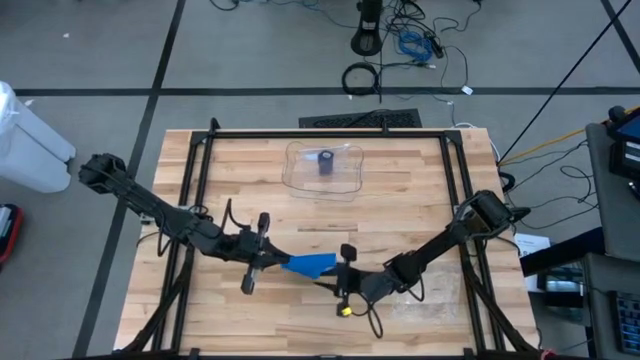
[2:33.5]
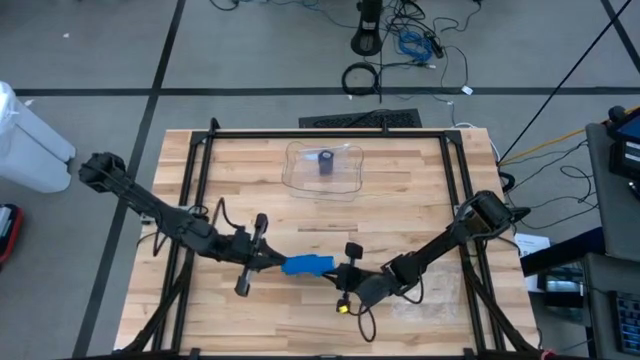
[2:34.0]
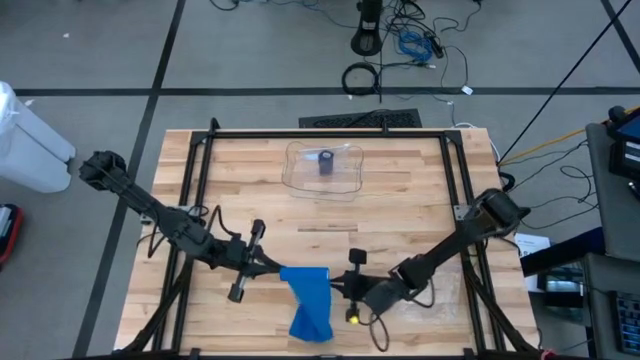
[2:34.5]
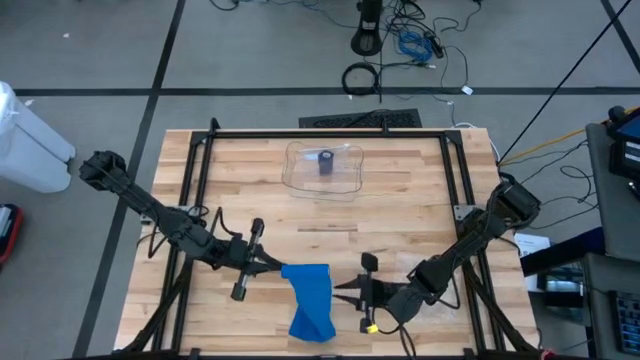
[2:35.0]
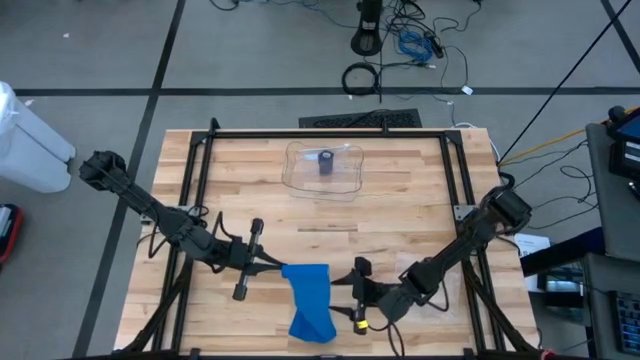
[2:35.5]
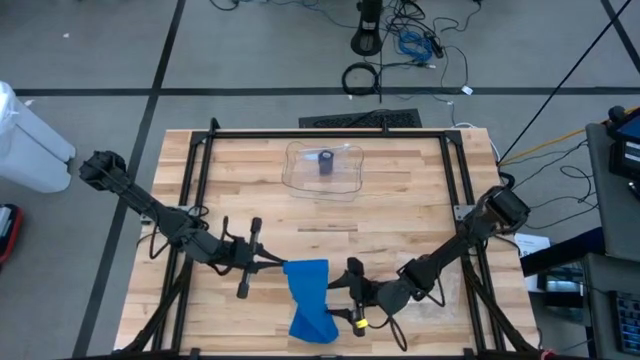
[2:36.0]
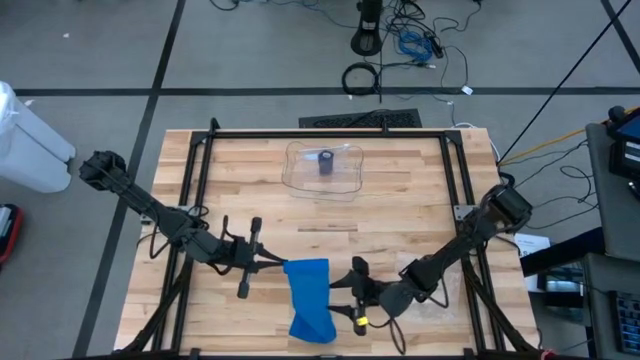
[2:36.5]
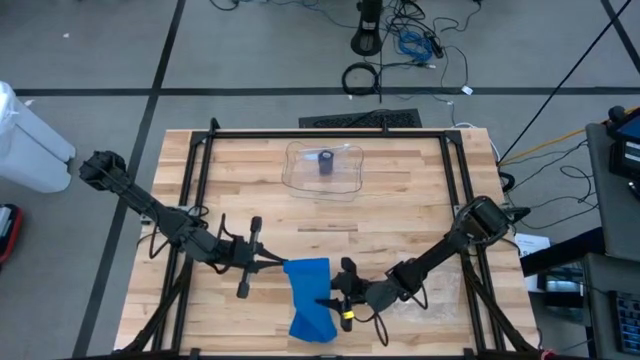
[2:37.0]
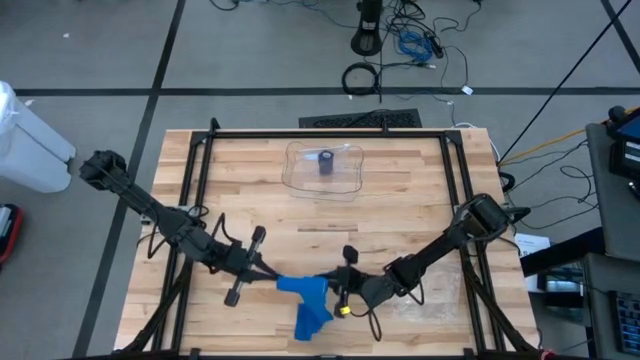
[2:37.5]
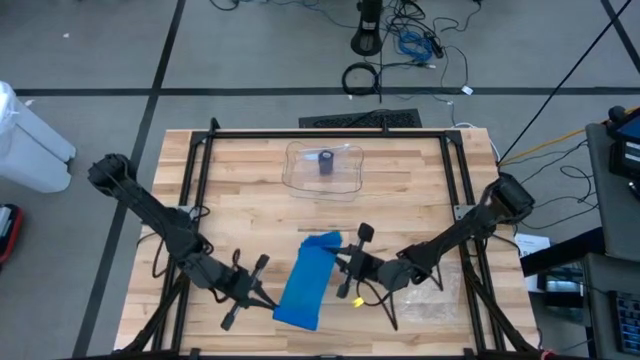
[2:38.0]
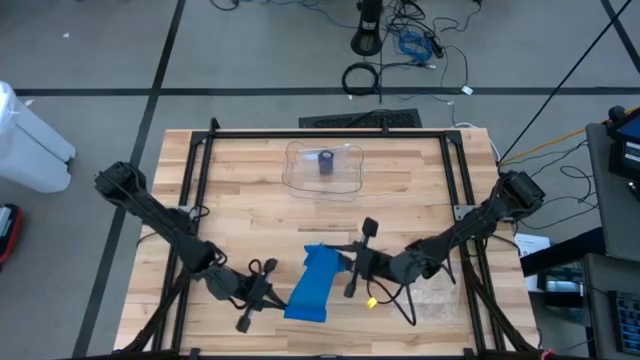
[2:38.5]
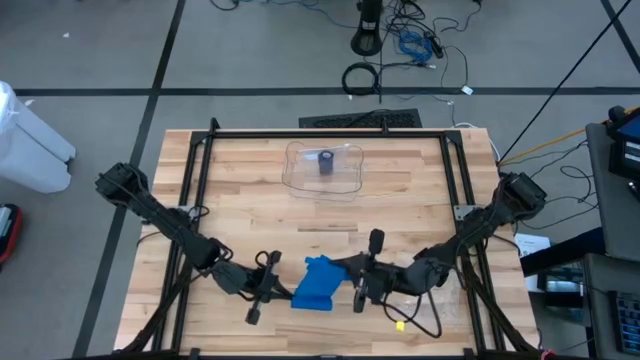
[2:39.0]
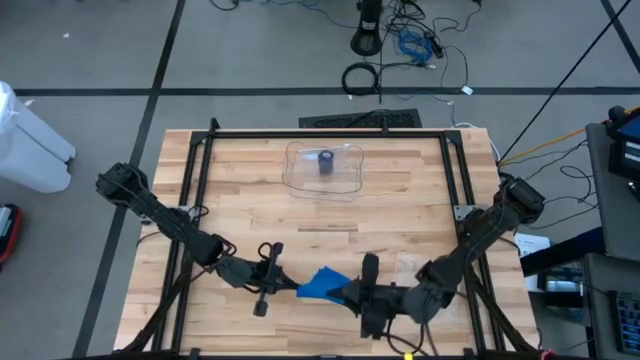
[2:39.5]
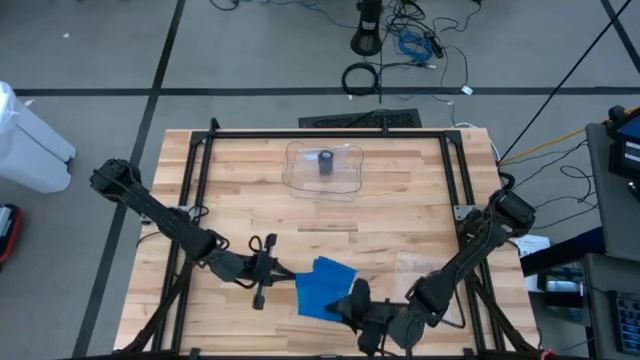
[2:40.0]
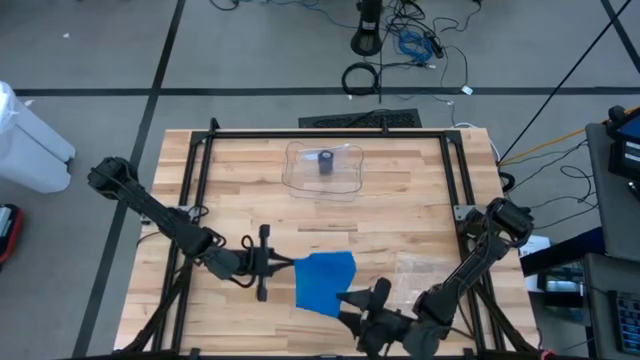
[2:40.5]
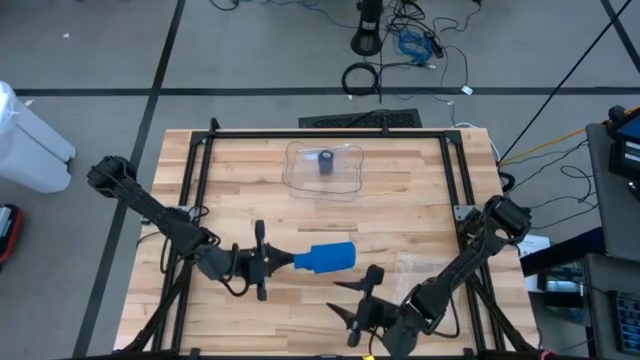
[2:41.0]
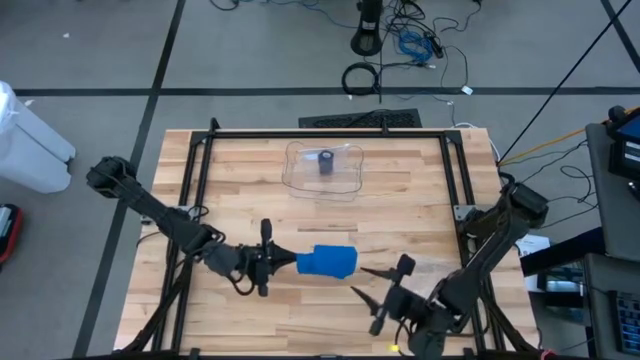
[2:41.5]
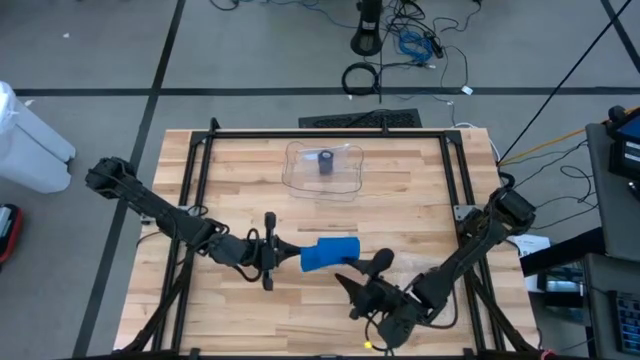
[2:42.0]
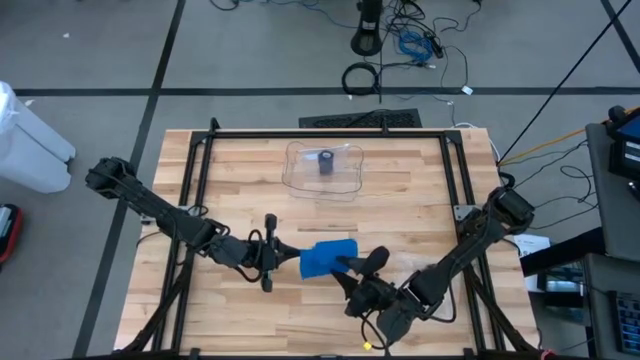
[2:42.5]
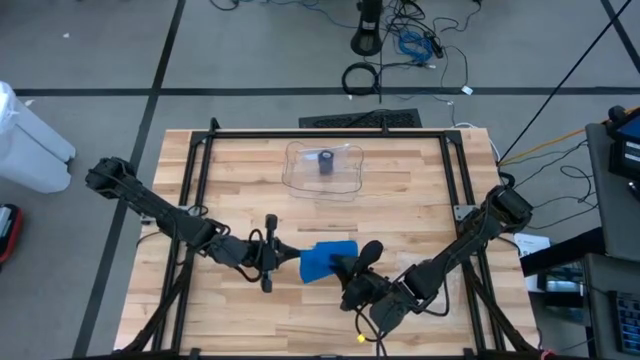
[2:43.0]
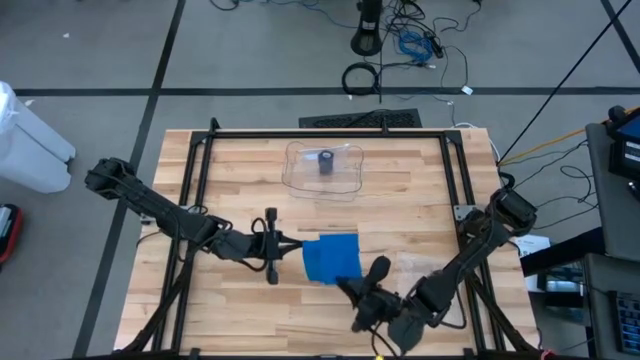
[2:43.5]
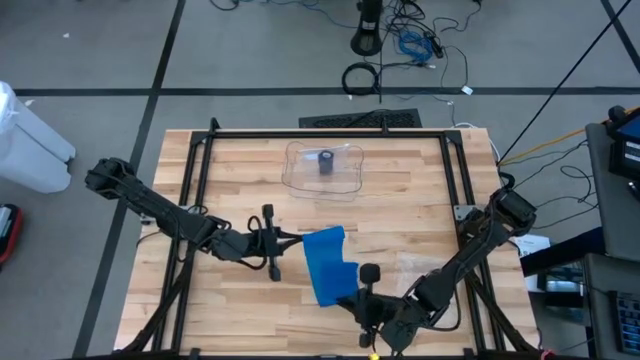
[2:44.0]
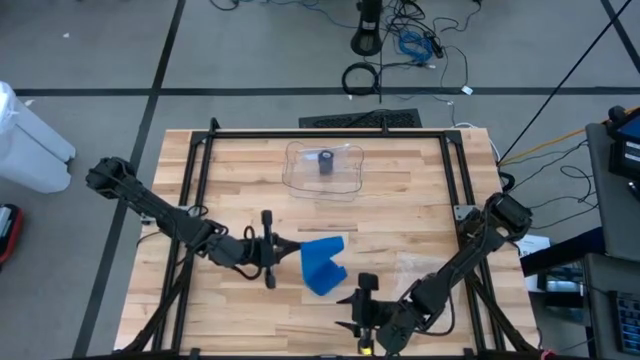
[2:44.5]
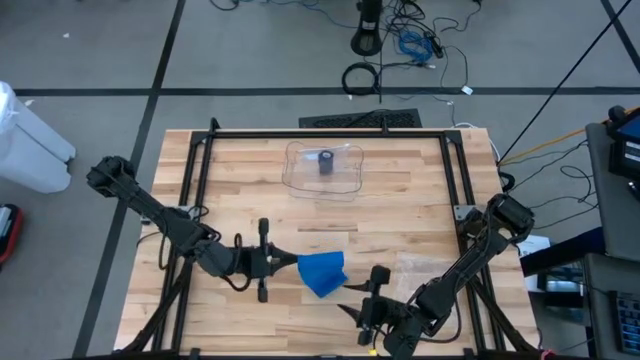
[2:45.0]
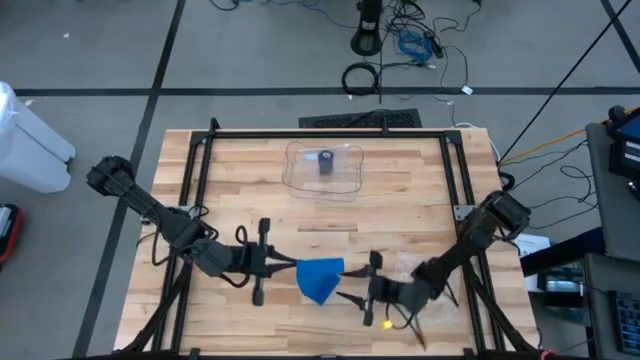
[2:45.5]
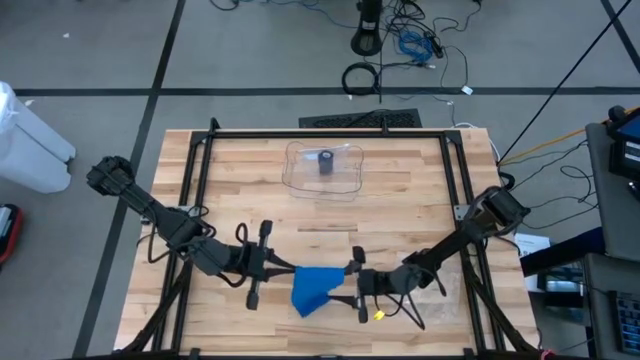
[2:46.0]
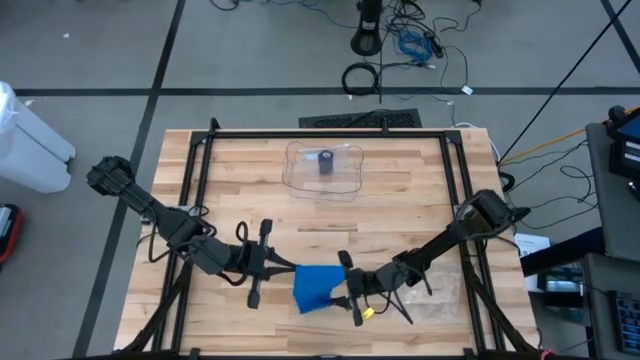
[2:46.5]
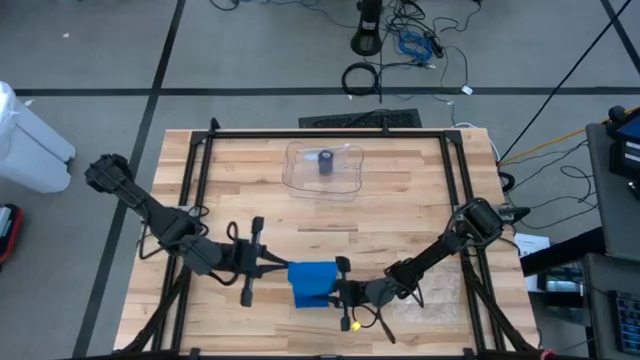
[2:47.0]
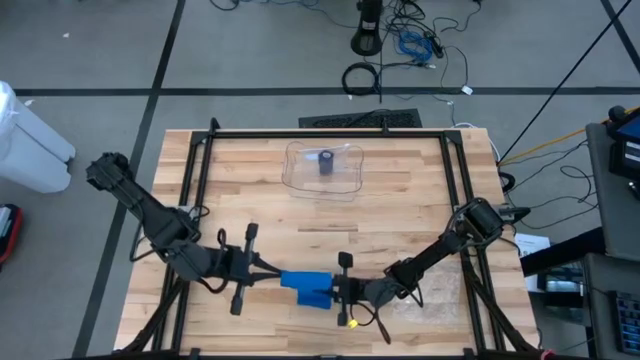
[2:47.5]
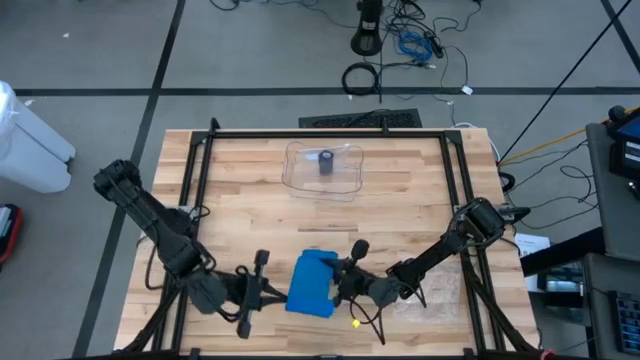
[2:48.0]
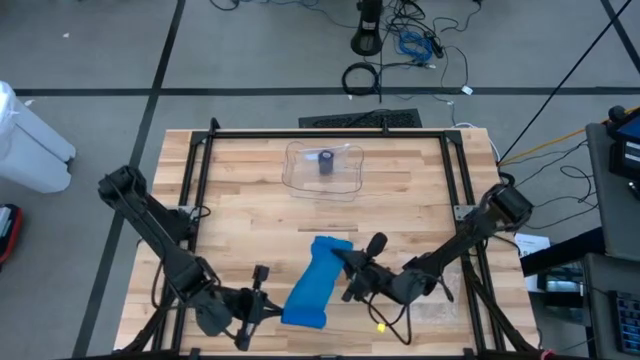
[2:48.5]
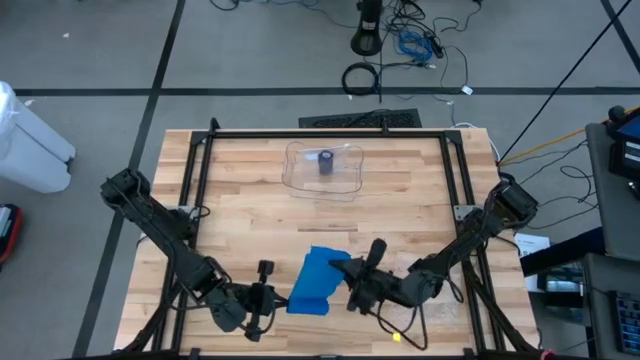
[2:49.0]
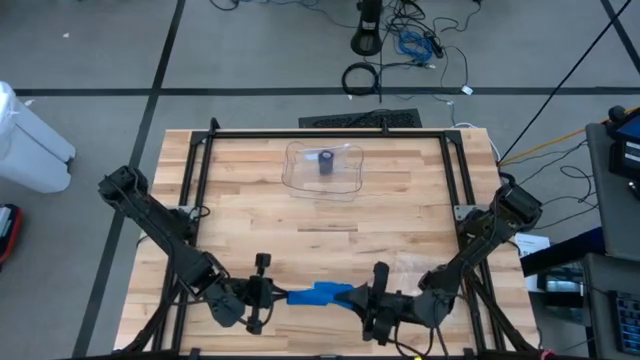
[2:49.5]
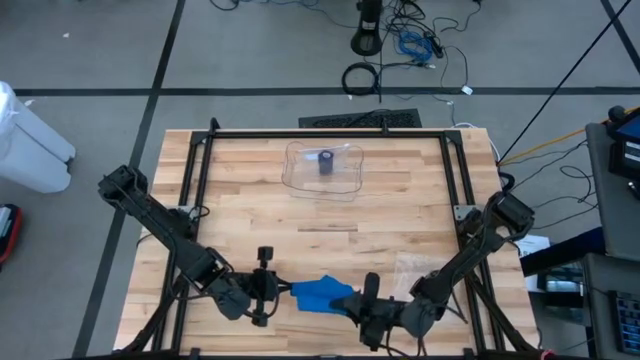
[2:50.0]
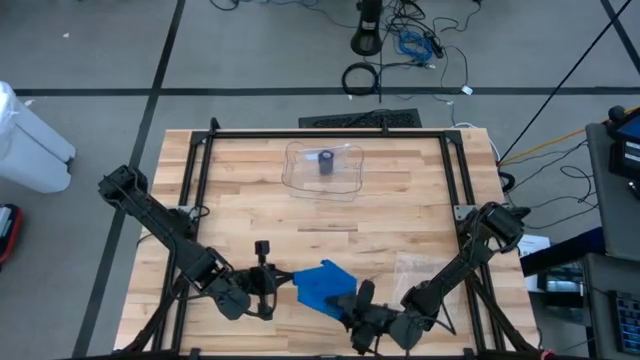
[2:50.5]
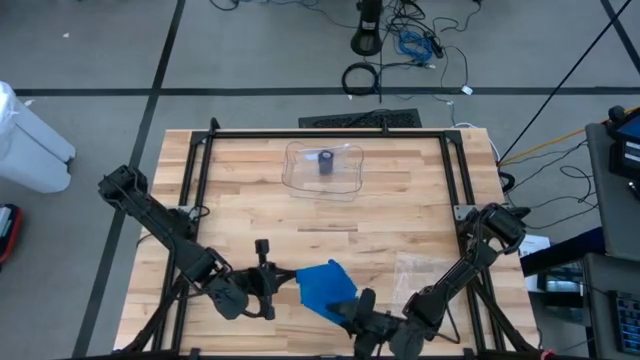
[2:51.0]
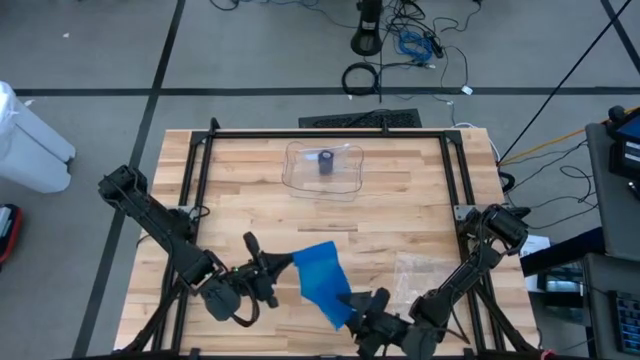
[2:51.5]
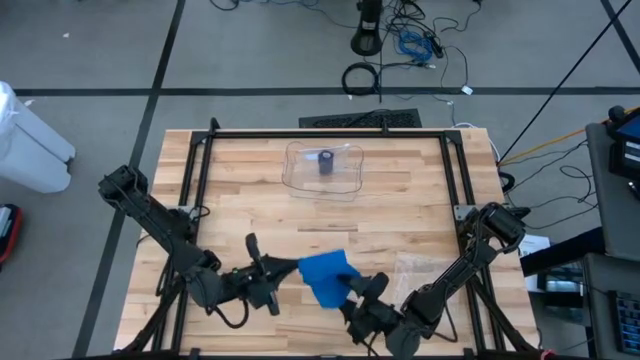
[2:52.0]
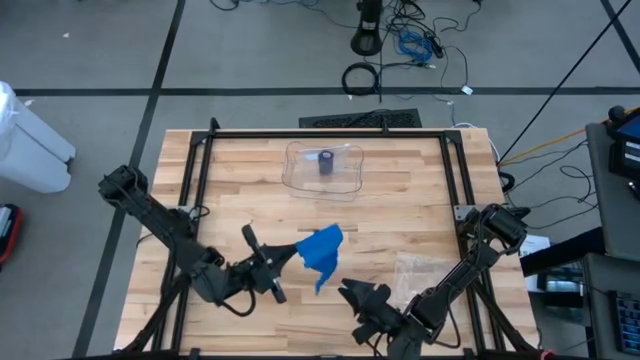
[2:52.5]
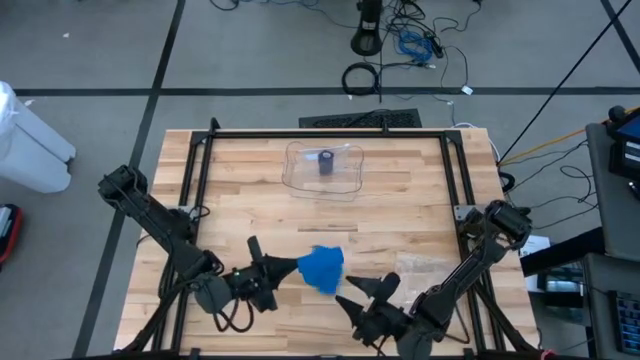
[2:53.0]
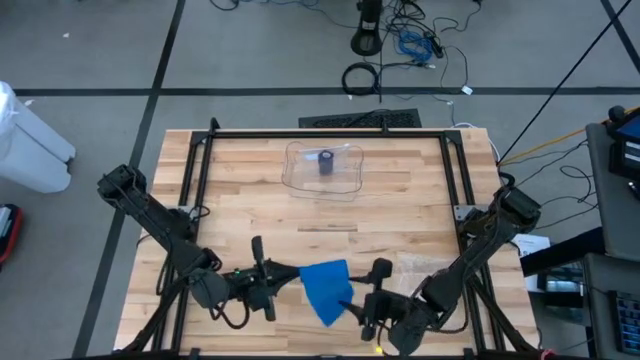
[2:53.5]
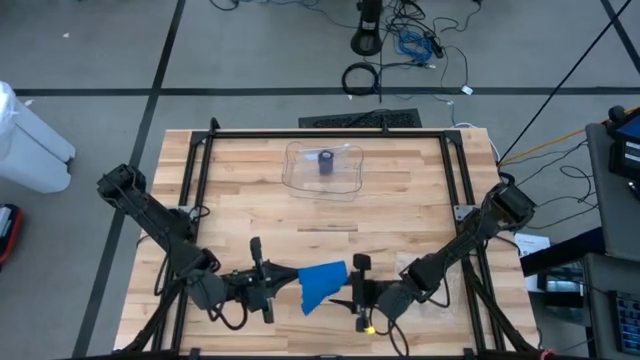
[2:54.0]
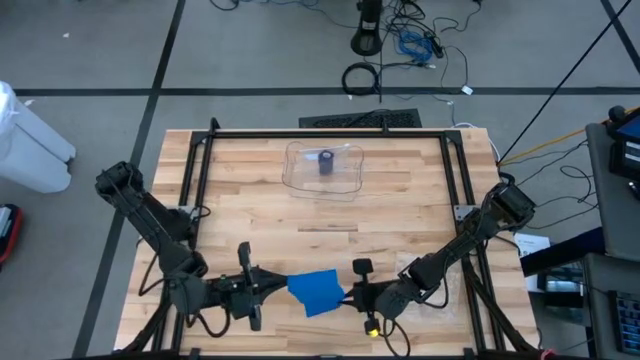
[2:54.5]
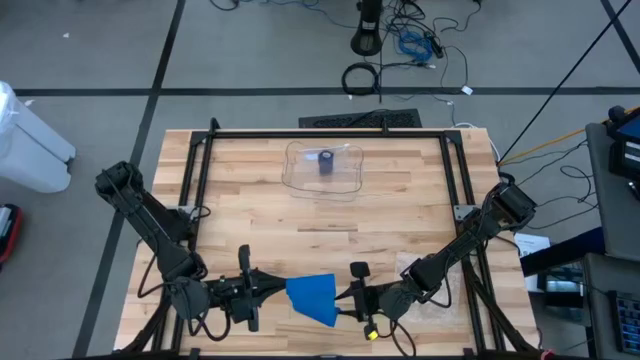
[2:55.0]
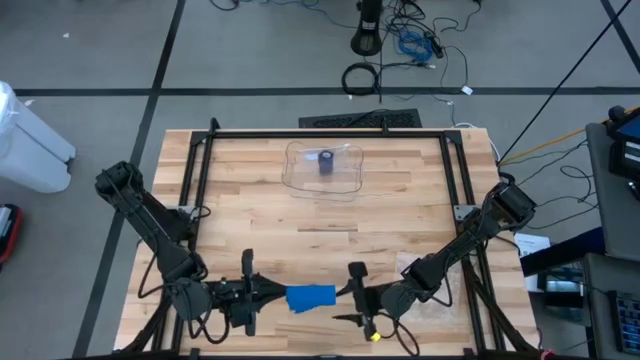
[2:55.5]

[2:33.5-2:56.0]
Task: Roll bandage
Roll the blue bandage
